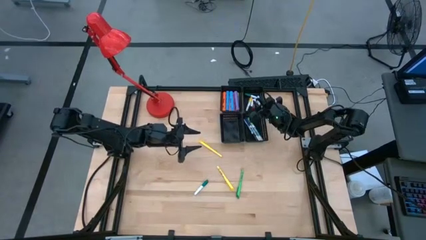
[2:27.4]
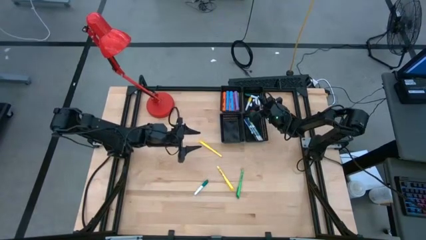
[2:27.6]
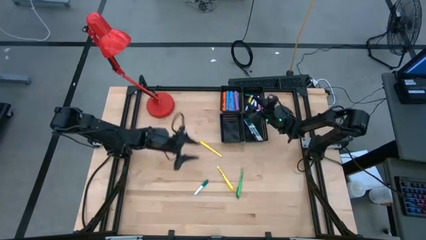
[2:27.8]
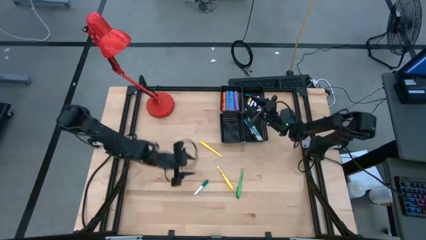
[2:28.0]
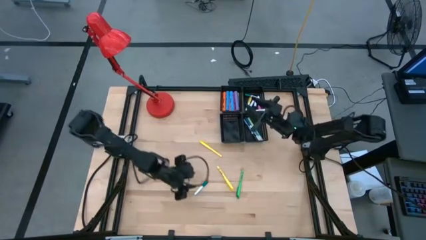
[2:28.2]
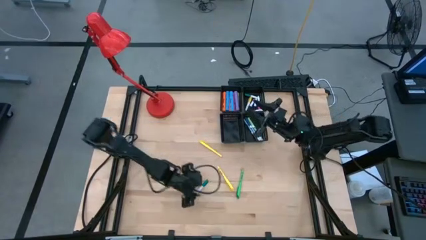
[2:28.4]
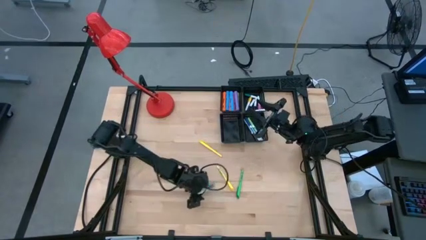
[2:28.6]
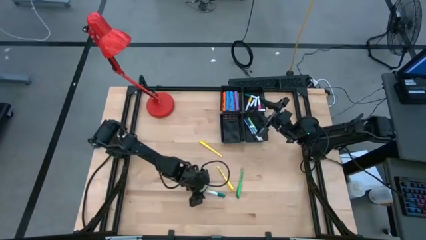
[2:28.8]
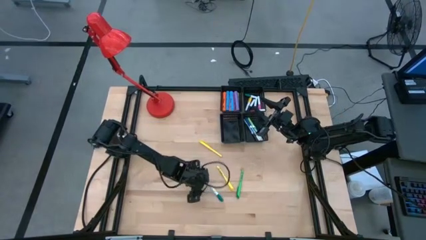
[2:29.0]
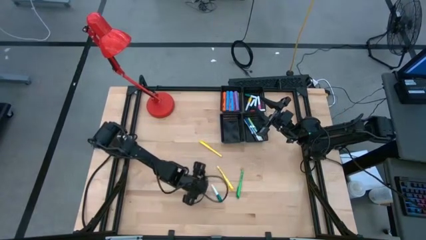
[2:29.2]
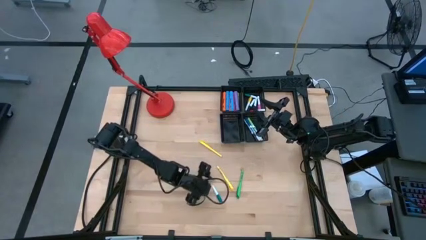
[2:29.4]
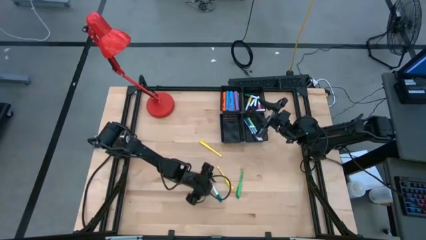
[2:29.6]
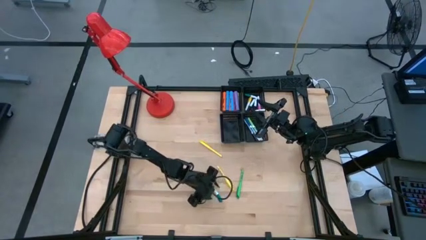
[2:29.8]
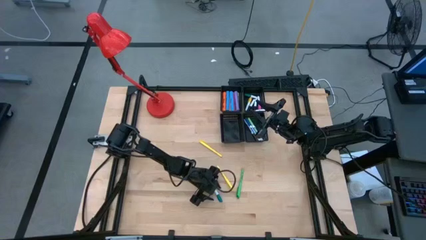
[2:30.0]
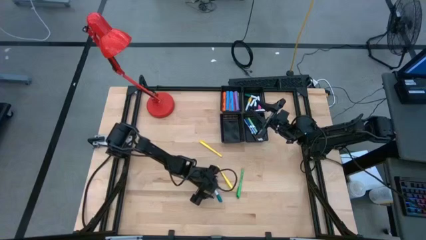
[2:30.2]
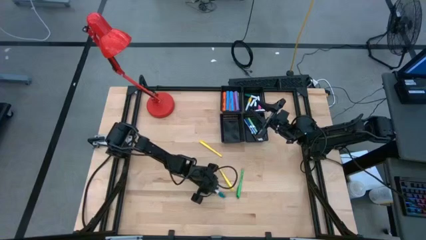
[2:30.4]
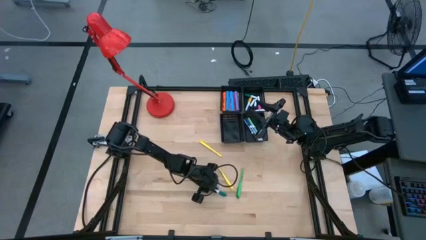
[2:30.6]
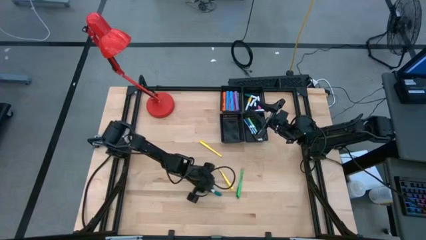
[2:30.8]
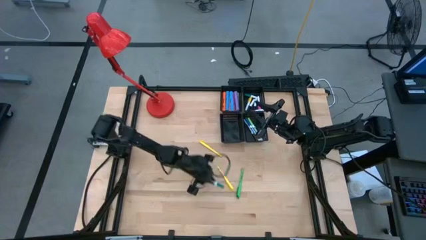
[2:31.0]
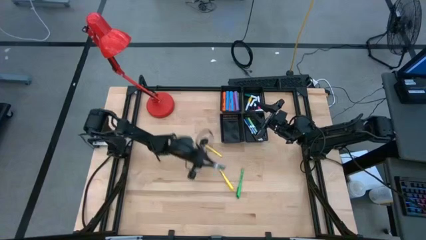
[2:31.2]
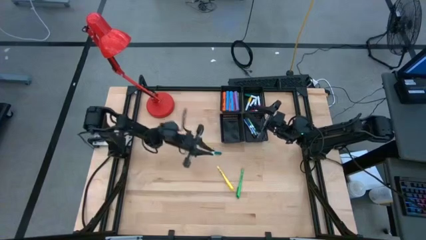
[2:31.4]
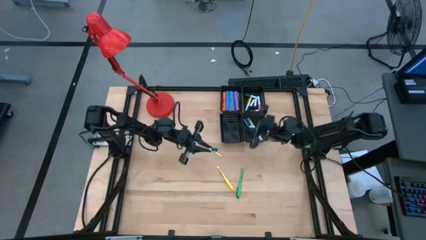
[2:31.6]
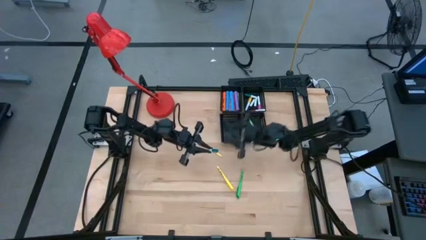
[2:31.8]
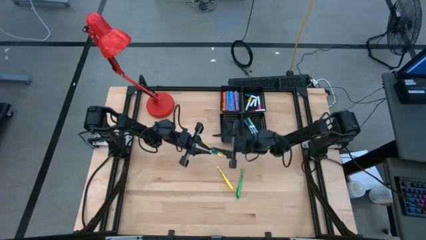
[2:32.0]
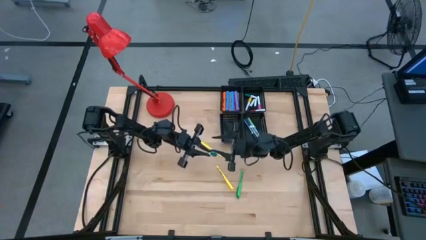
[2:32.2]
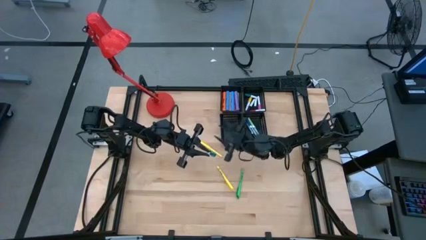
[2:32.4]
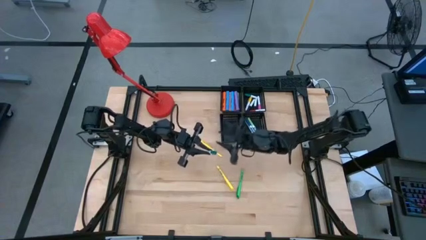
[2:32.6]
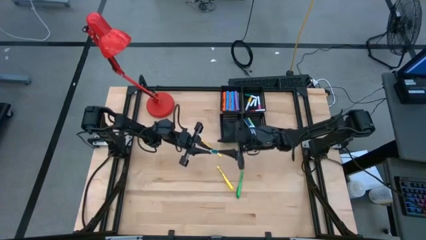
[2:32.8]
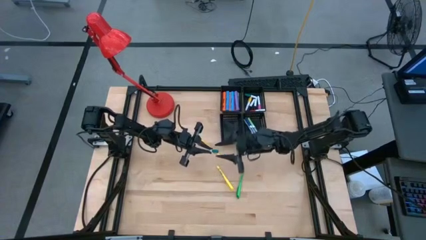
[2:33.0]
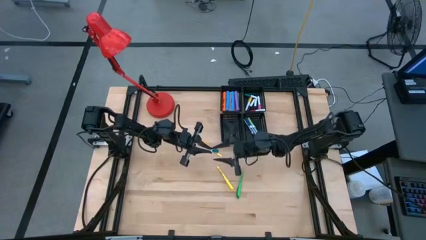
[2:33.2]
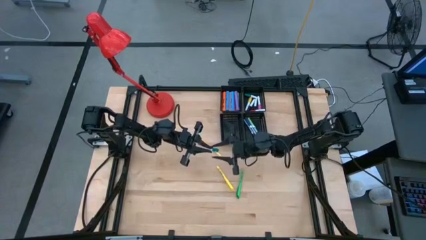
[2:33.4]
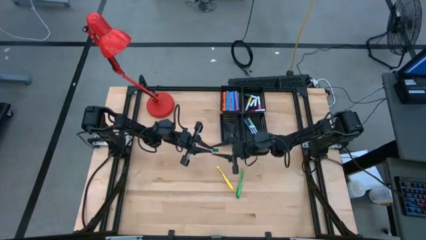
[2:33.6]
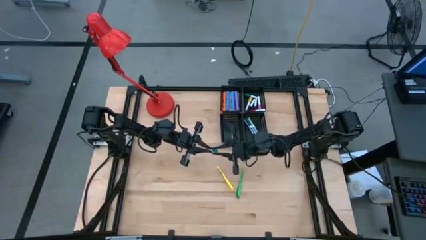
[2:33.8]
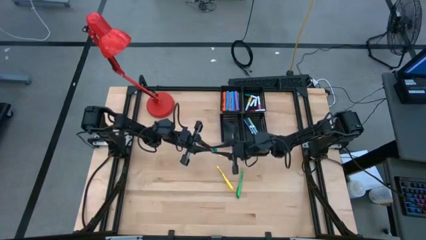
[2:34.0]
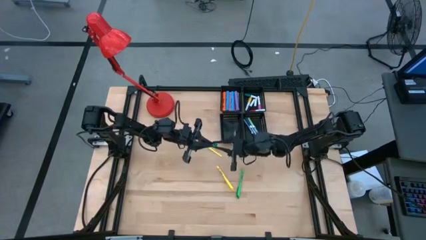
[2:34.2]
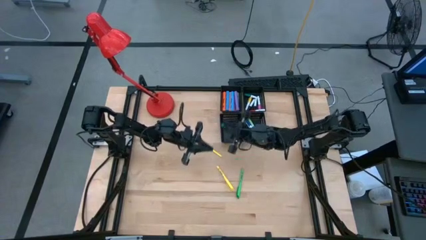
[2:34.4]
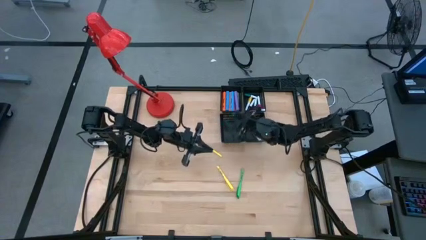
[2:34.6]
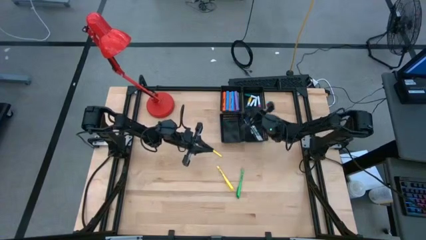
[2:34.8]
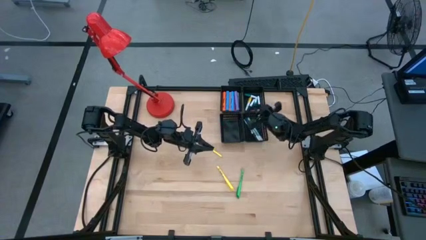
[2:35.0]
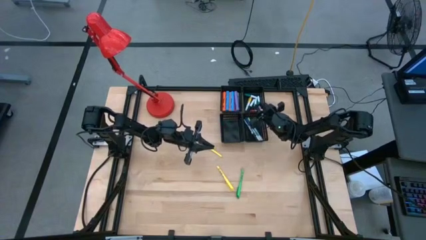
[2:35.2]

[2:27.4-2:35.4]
Task: Pick & Place Markers
Put the green and white highlighter pen into the top right black bin

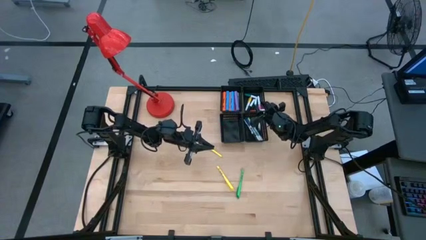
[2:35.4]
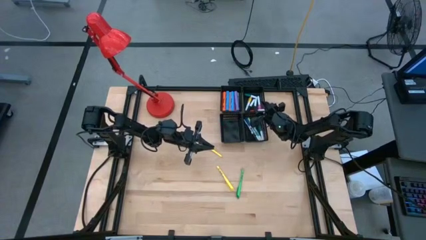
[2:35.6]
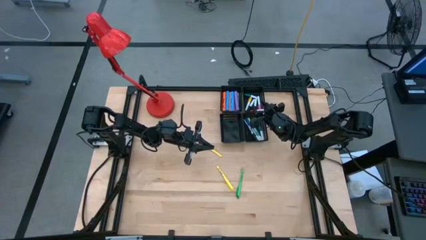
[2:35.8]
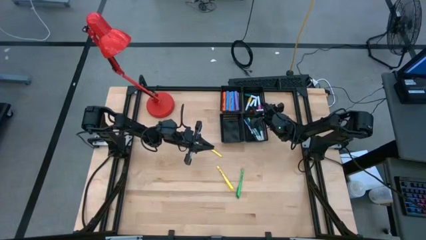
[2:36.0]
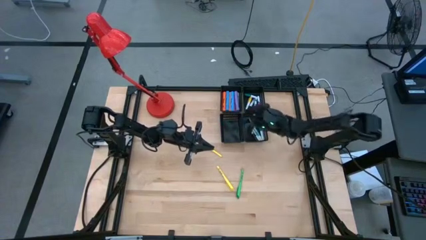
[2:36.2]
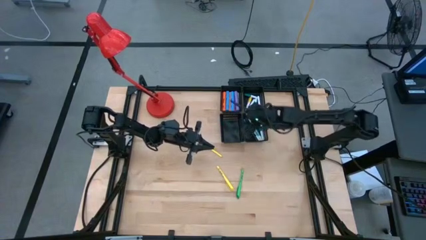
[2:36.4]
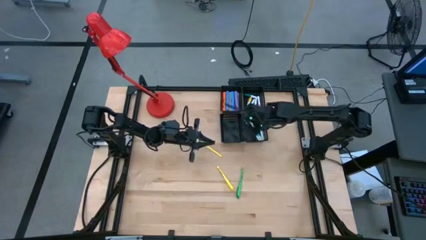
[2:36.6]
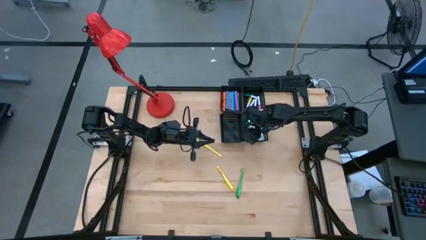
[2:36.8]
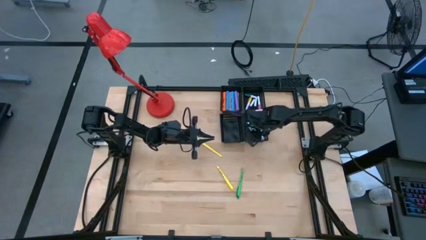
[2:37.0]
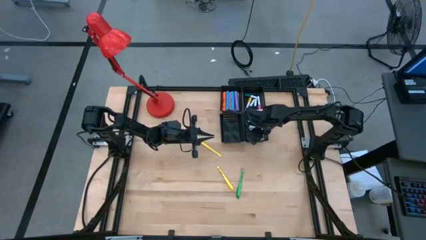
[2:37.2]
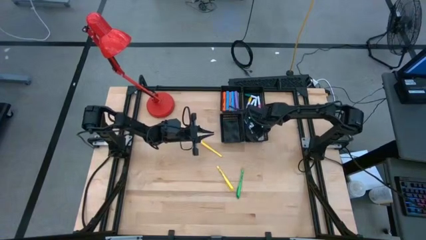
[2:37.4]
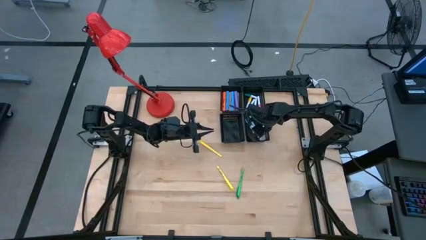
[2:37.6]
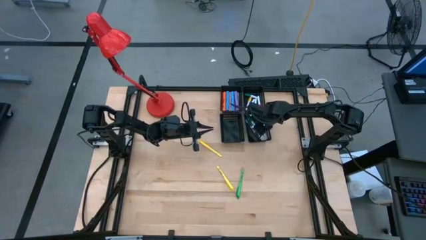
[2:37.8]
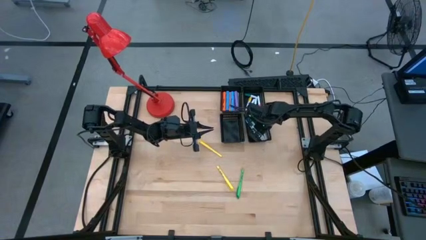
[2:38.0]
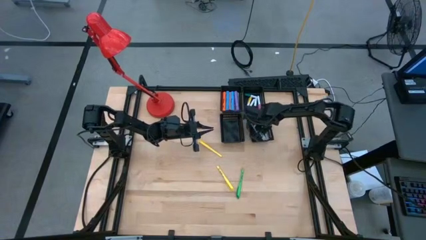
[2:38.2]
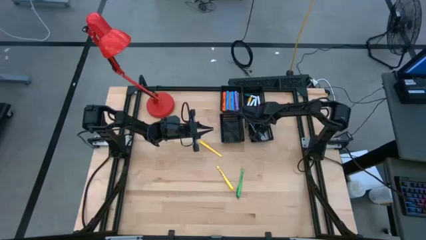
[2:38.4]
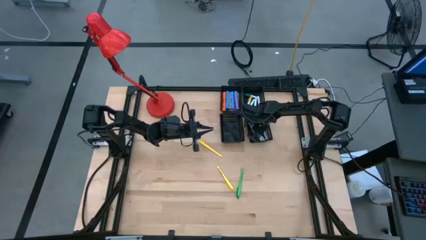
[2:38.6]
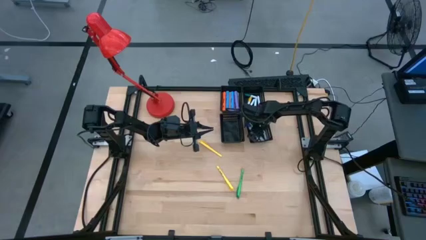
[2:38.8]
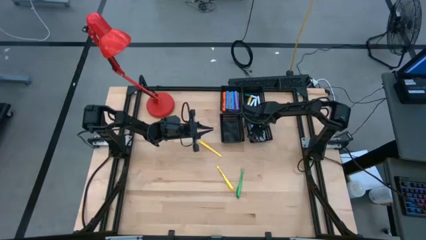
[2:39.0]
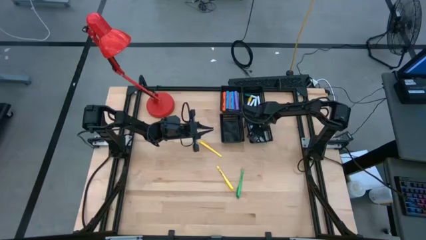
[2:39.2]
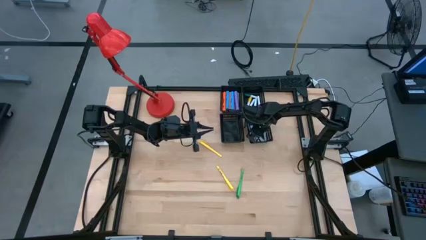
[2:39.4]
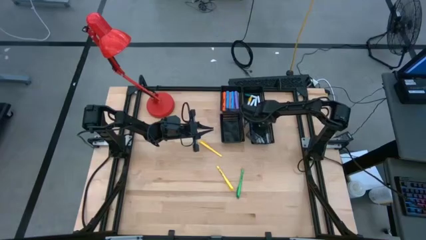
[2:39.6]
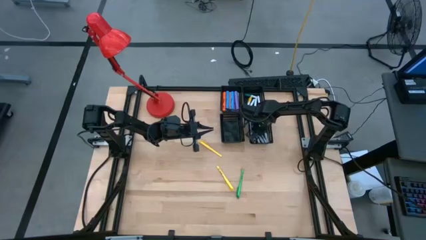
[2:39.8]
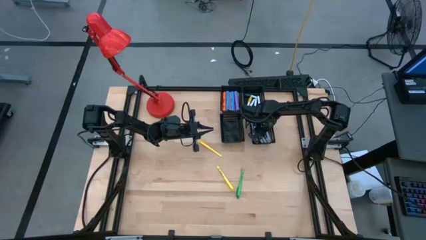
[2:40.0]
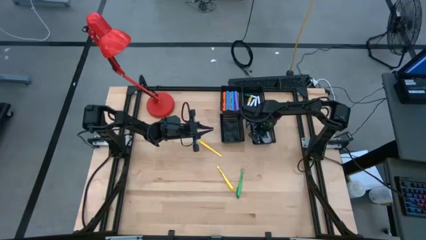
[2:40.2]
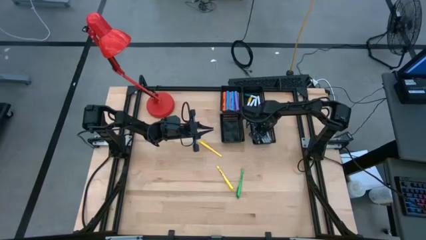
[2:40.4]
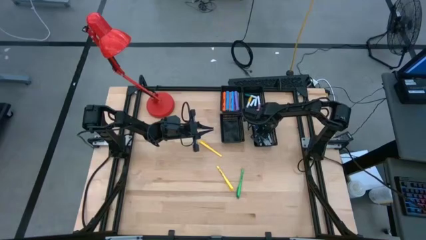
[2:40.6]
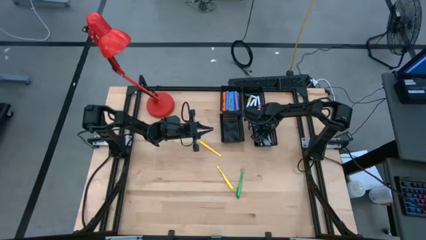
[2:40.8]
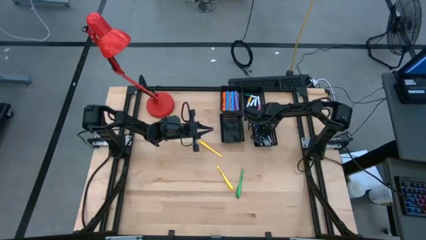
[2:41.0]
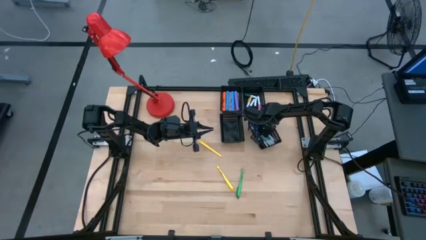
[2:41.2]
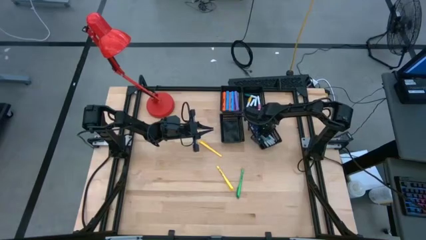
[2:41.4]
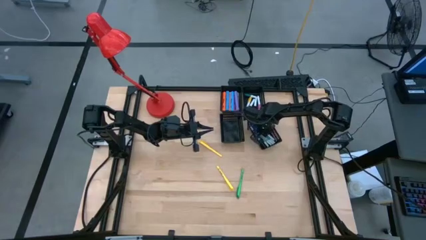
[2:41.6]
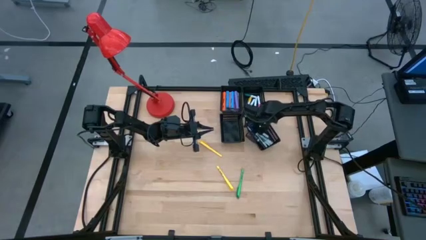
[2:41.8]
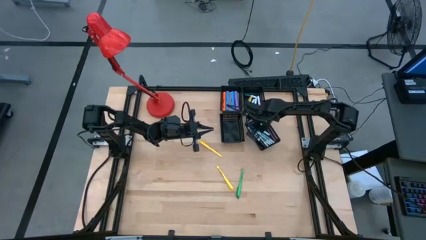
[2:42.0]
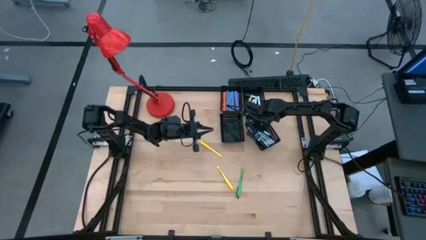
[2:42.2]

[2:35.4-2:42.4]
Put the green highlighter pen into the top right black bin
